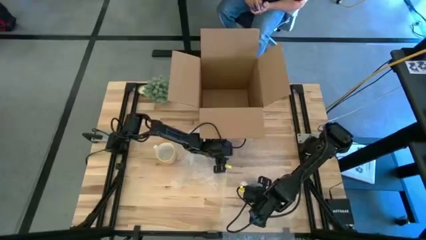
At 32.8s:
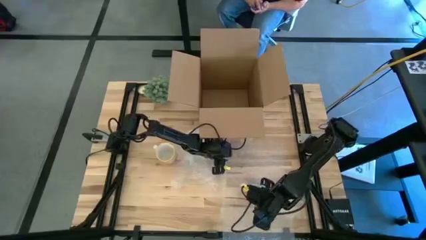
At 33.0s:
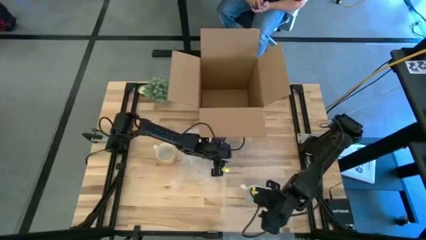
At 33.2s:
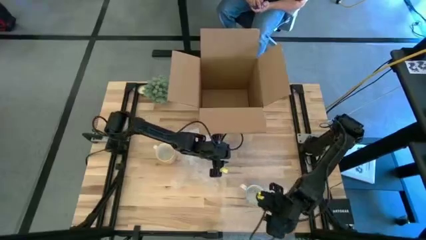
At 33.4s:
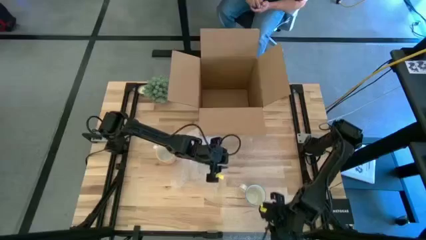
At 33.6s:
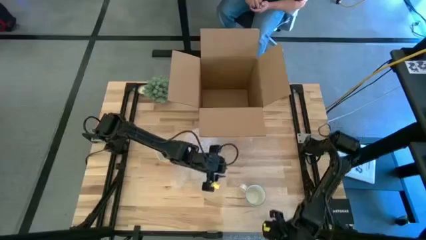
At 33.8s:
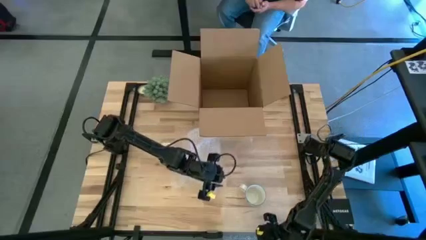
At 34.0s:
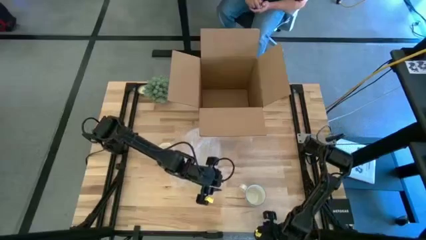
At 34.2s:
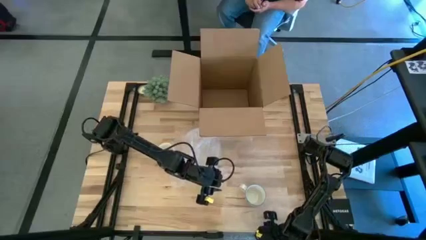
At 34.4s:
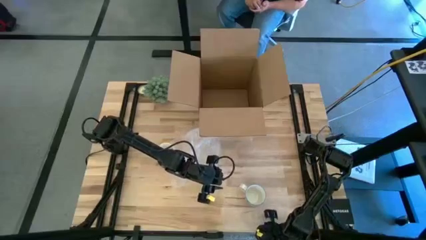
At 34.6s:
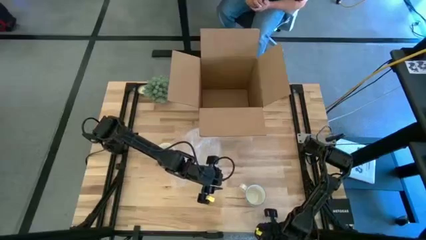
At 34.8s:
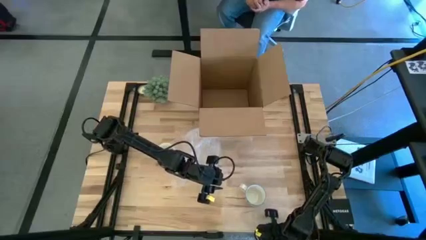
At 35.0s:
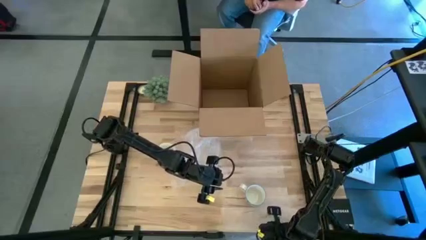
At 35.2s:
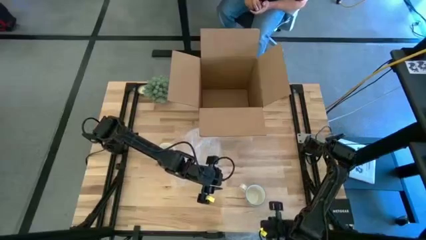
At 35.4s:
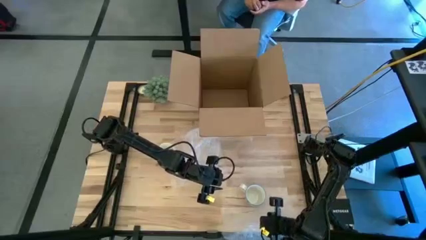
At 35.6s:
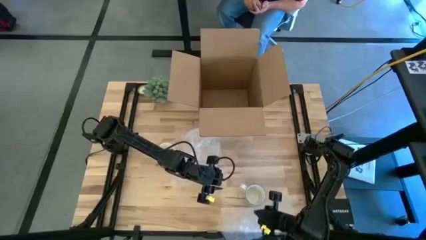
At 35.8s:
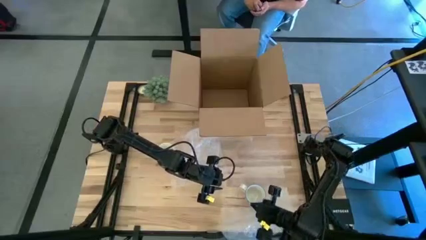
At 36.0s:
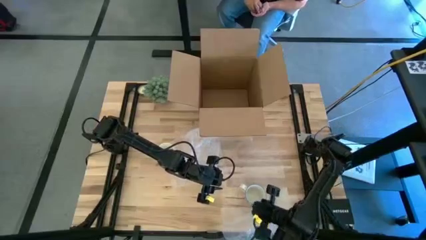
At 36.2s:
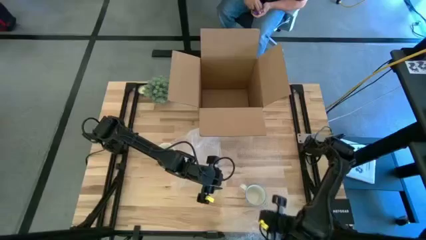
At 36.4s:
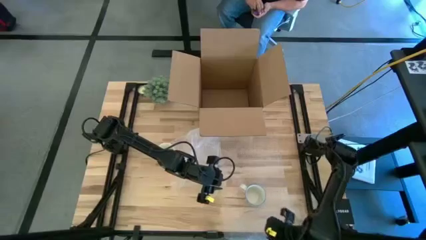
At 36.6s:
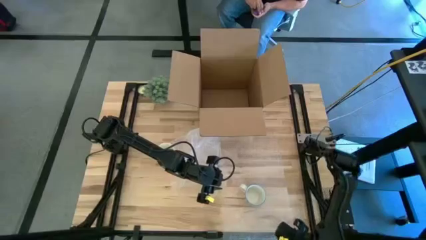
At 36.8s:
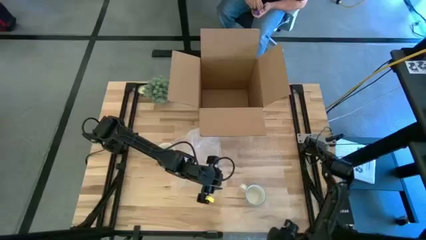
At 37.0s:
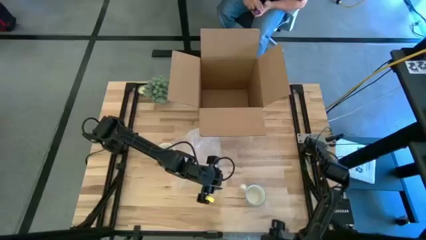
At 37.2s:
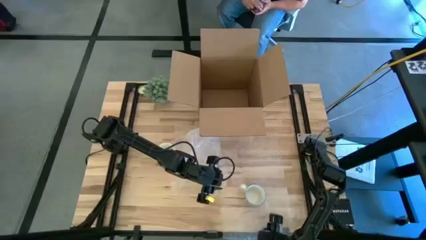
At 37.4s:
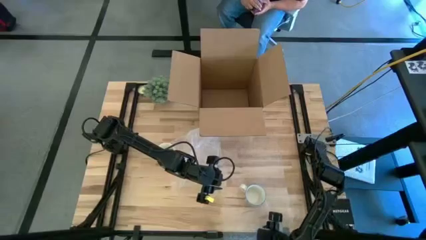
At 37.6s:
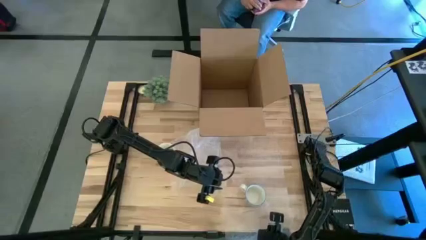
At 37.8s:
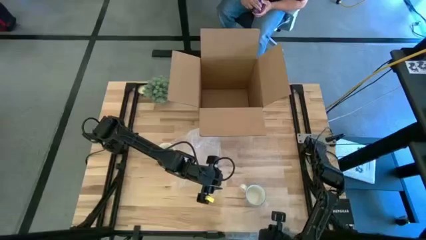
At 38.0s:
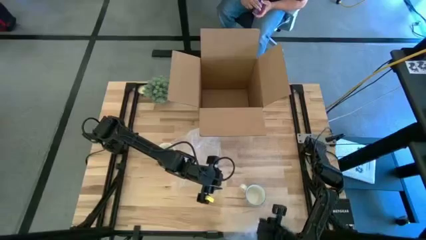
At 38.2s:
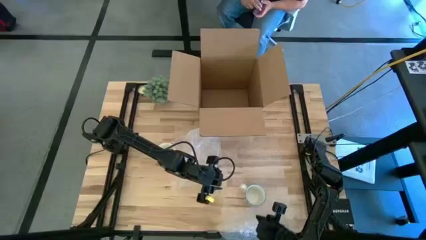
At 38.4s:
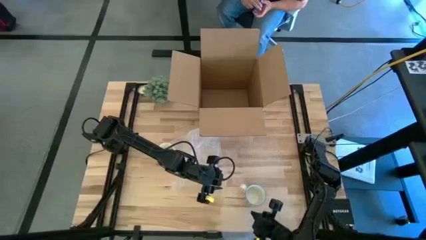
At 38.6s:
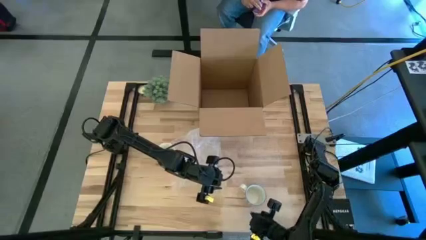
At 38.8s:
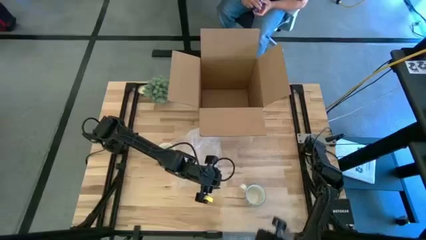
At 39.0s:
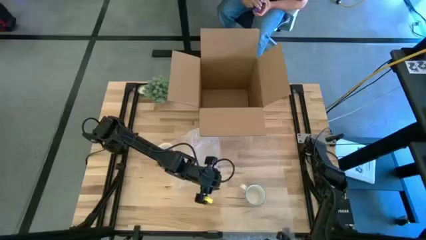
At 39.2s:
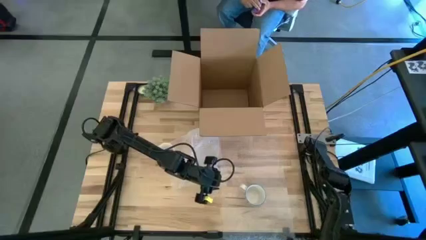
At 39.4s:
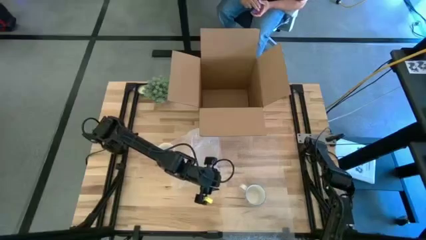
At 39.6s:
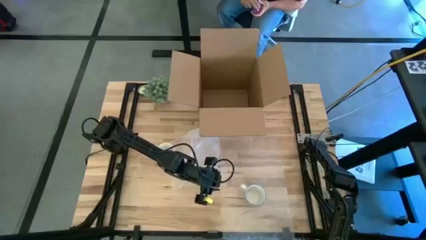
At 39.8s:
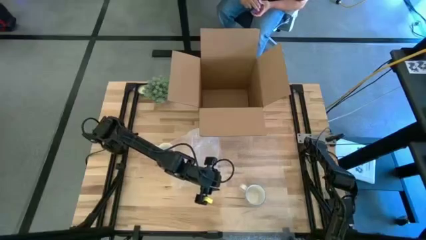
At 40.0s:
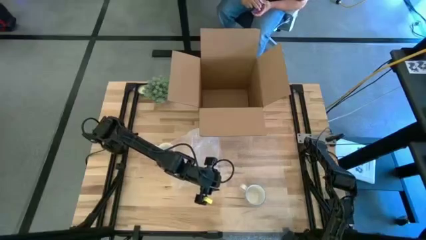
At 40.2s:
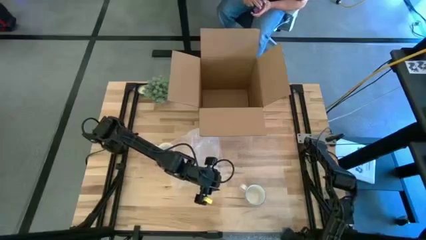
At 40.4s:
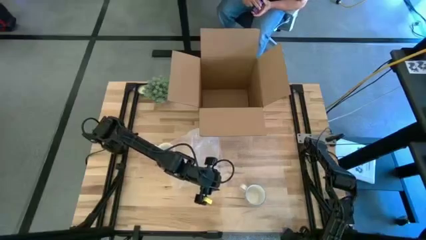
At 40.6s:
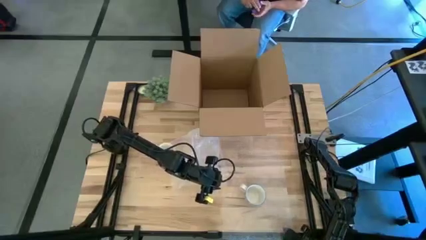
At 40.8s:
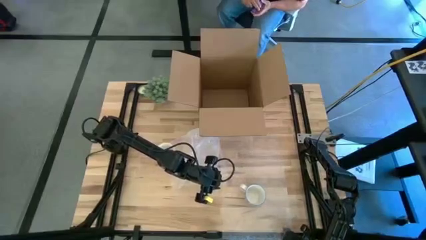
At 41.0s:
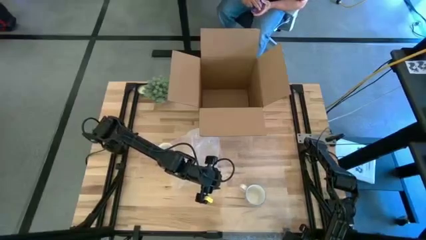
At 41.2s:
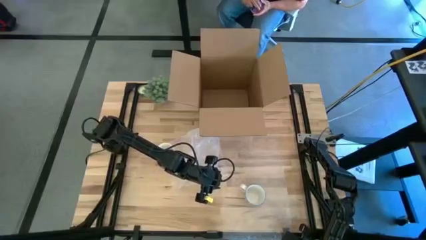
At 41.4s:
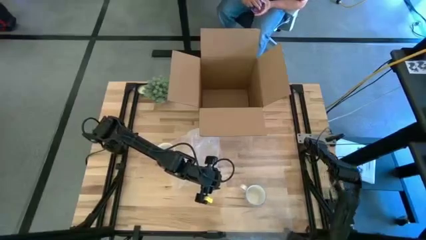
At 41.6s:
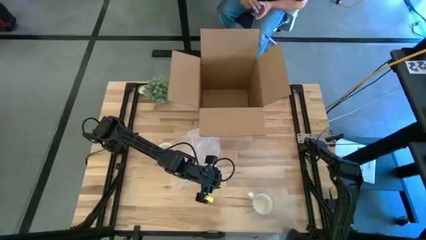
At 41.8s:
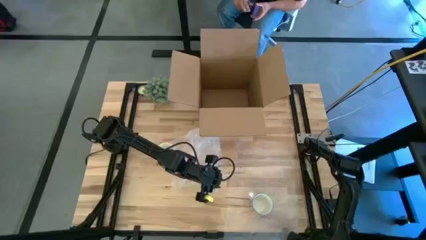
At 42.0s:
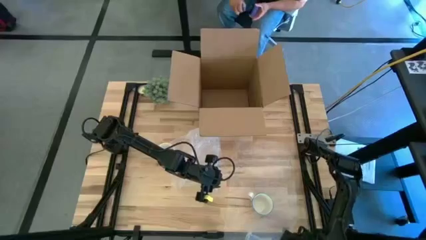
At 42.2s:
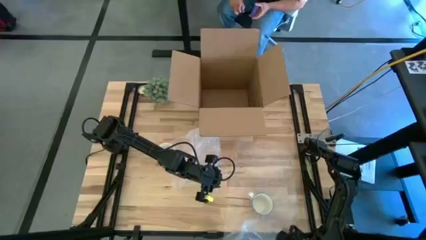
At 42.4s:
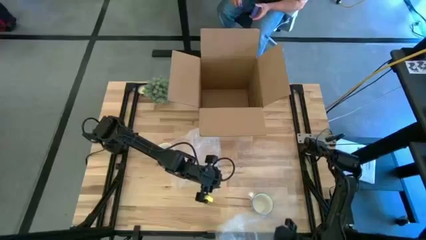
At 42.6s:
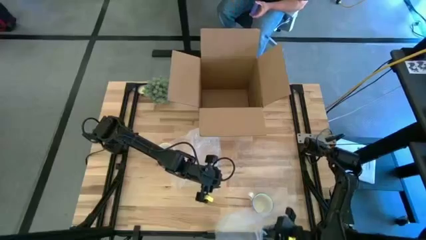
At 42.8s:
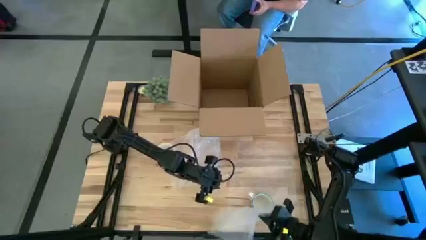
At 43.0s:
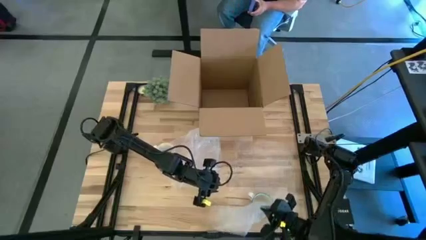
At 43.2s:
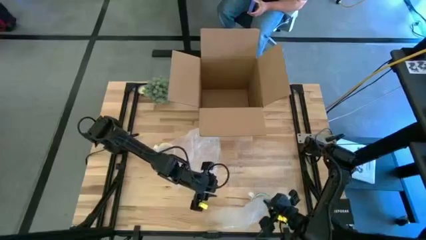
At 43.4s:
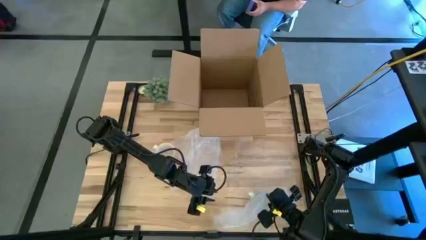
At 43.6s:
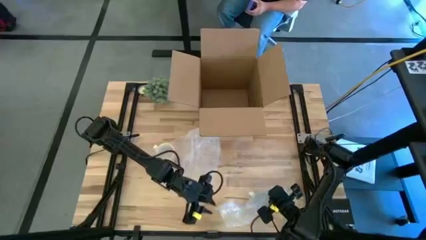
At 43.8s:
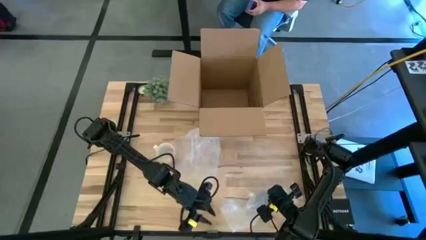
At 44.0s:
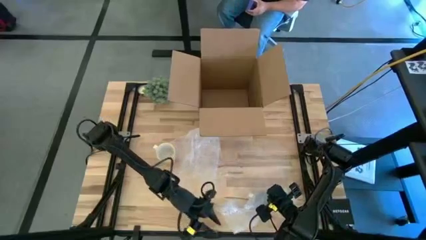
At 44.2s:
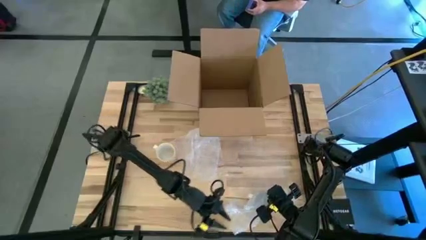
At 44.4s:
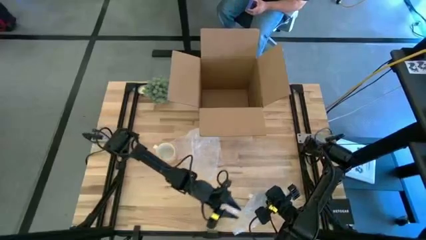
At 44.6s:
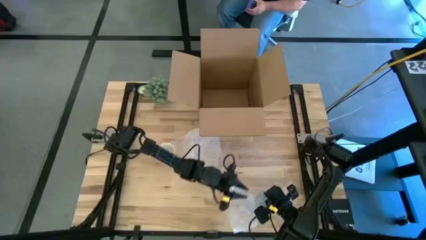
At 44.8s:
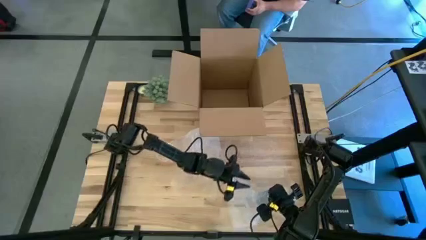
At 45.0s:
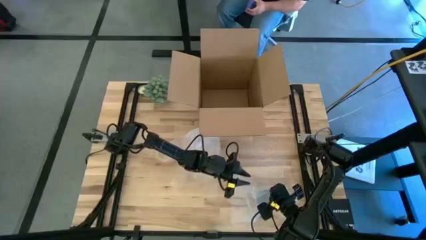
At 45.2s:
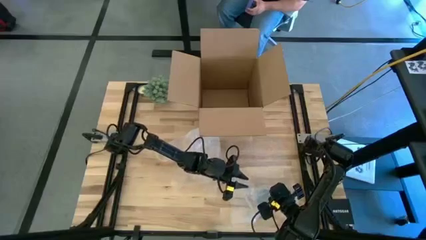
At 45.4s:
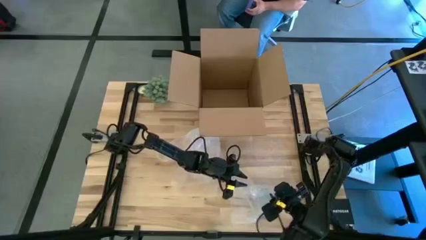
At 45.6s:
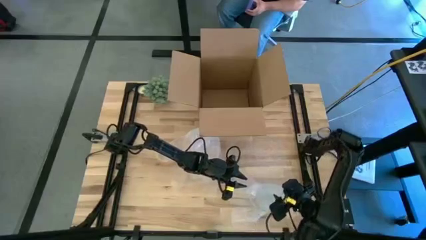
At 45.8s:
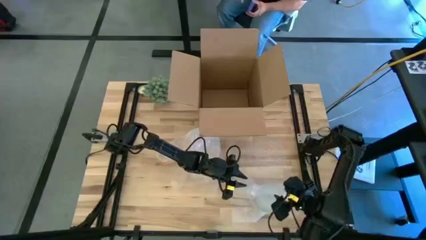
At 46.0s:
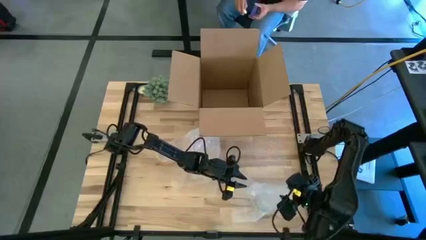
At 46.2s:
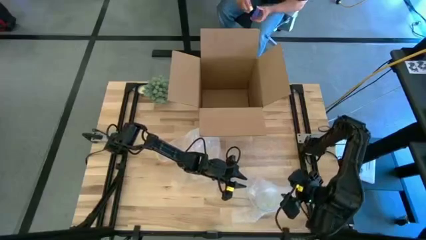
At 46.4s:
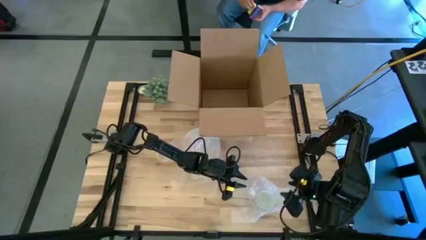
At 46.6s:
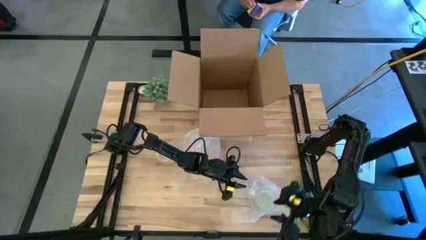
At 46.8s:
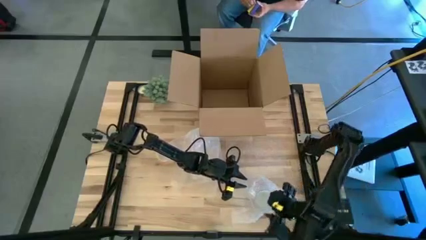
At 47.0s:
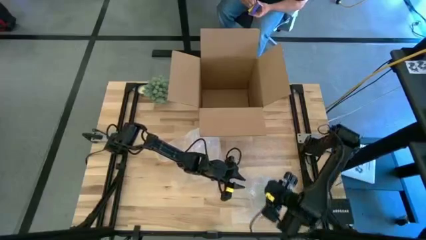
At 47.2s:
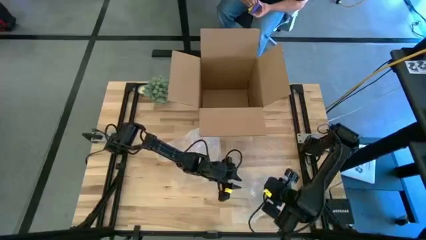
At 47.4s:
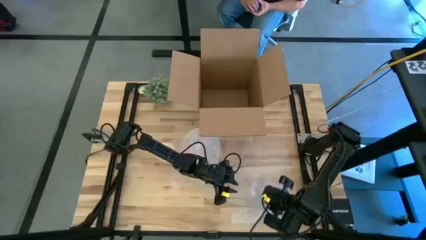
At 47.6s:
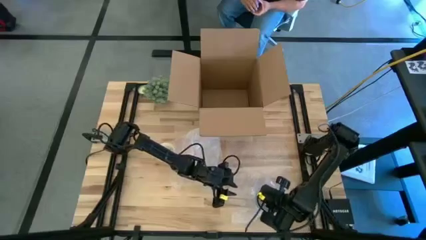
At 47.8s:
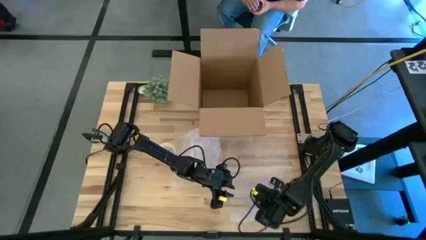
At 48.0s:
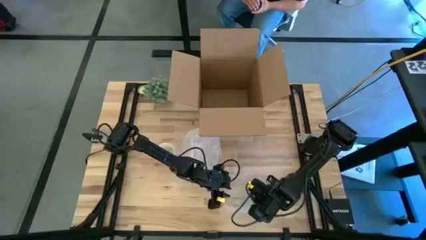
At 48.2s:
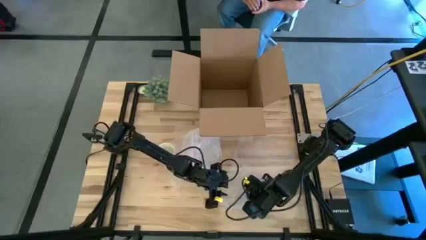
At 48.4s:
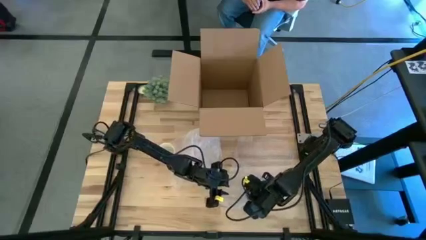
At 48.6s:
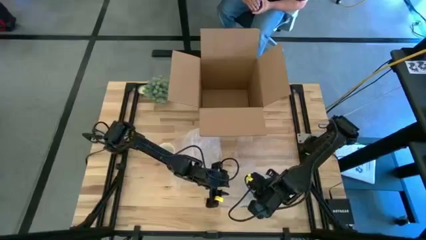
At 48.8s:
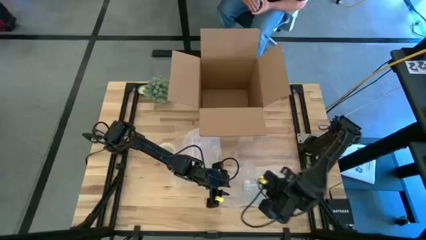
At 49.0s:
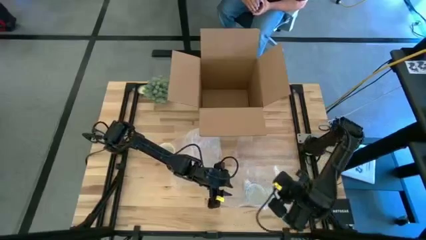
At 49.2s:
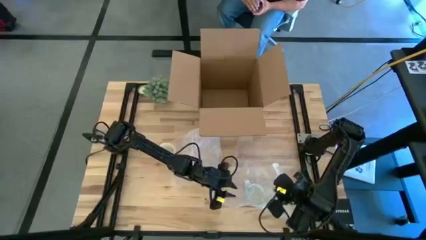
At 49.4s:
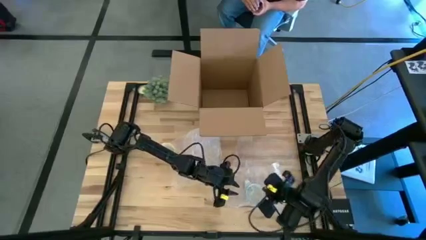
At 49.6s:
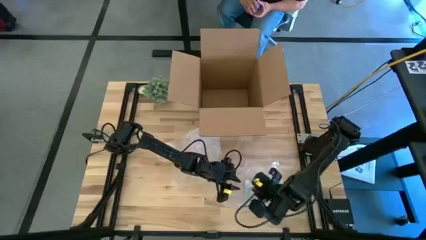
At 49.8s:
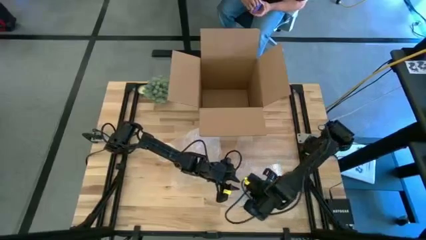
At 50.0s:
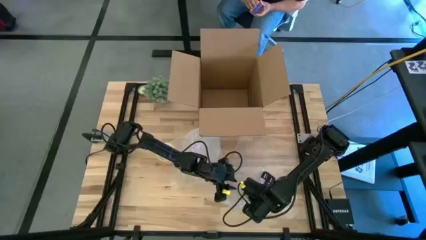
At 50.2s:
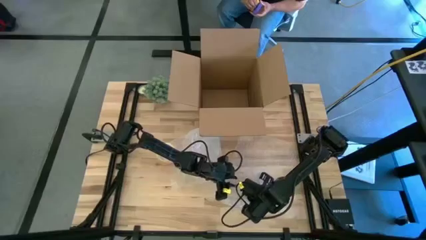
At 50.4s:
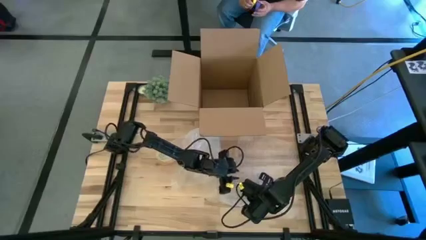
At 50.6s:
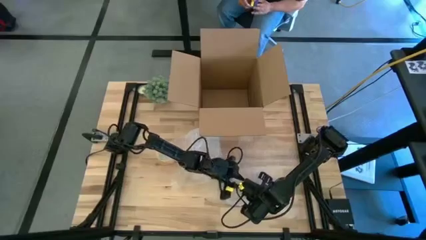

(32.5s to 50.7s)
Task: wrap mug
Wrap the red mug with the right bubble wrap
